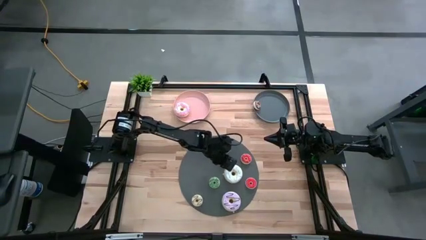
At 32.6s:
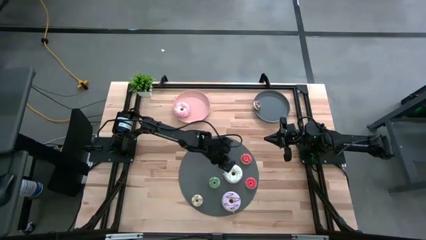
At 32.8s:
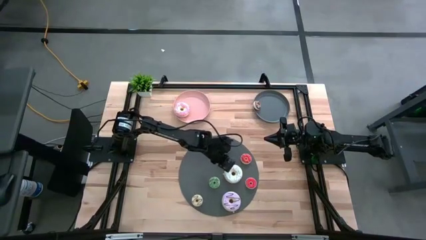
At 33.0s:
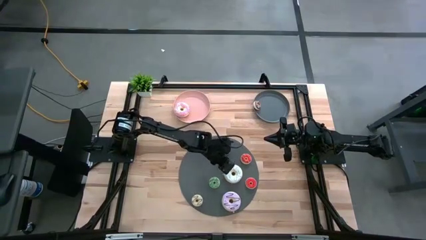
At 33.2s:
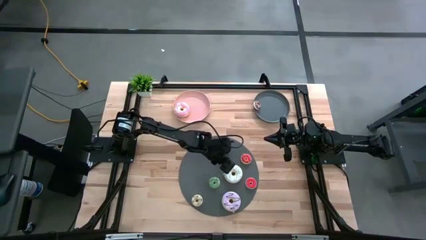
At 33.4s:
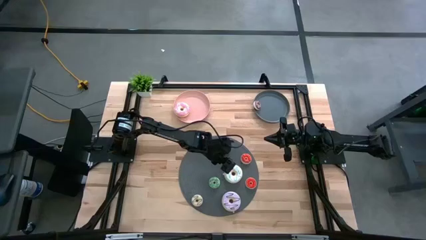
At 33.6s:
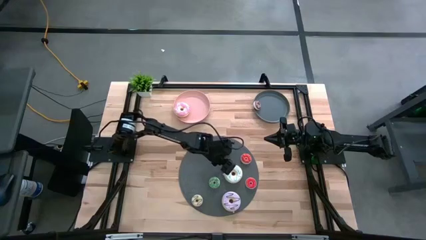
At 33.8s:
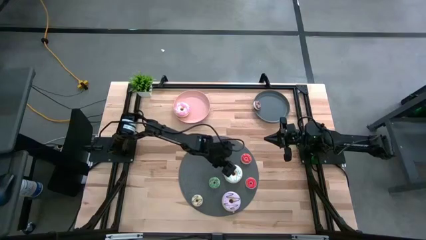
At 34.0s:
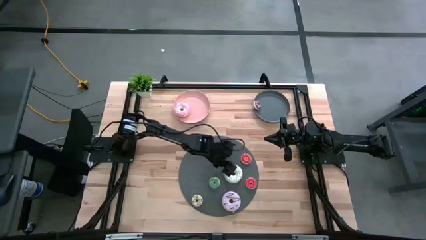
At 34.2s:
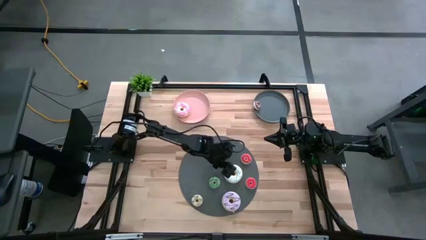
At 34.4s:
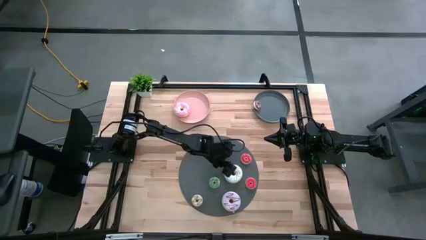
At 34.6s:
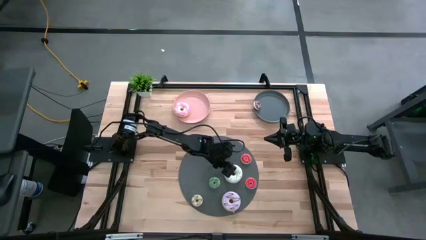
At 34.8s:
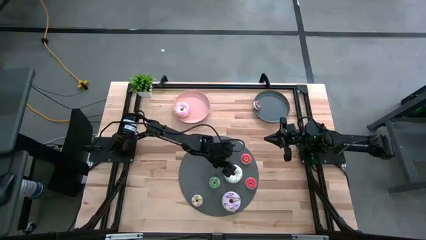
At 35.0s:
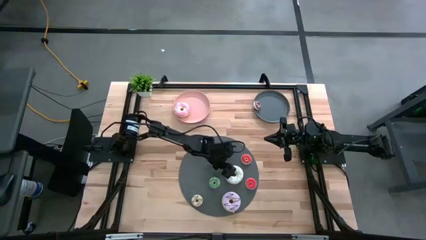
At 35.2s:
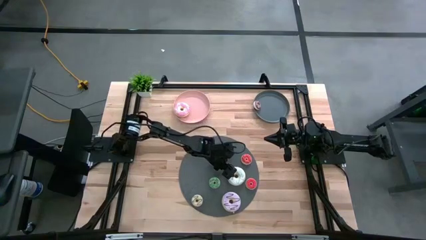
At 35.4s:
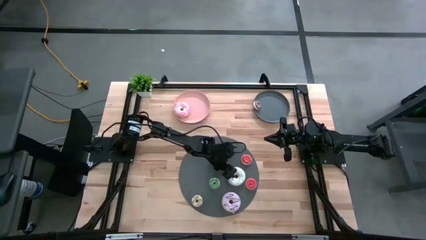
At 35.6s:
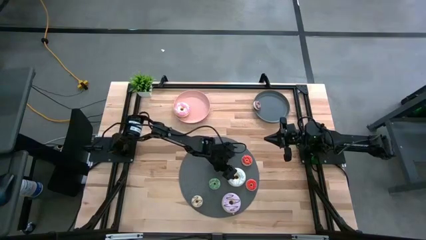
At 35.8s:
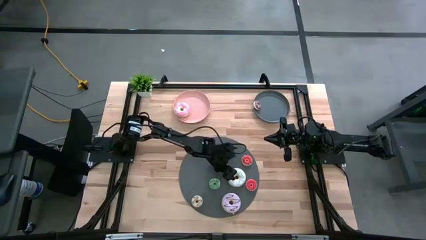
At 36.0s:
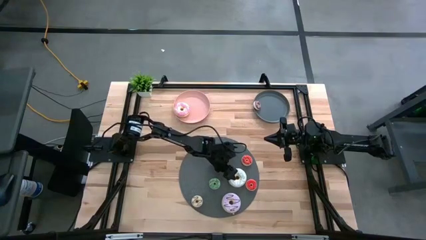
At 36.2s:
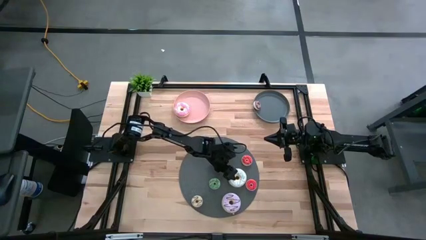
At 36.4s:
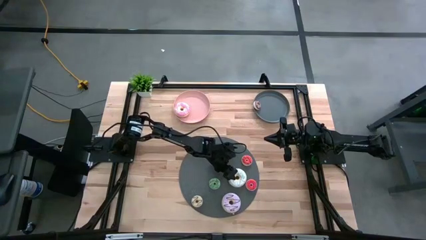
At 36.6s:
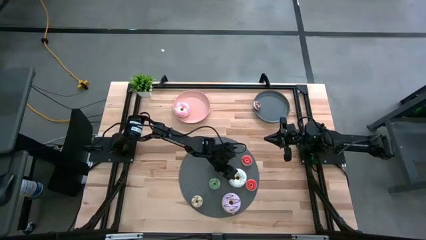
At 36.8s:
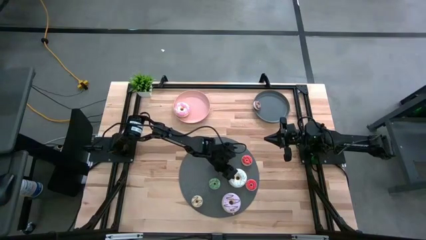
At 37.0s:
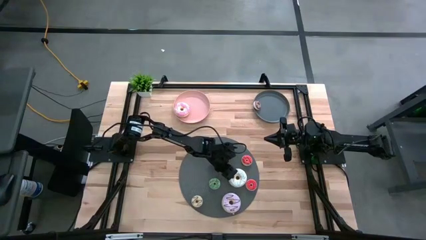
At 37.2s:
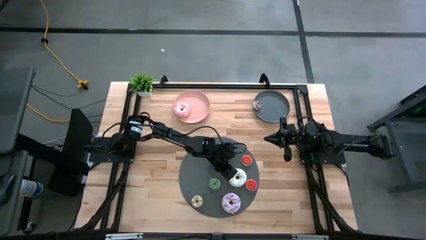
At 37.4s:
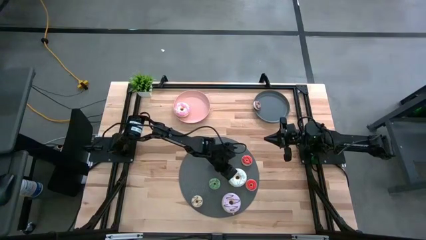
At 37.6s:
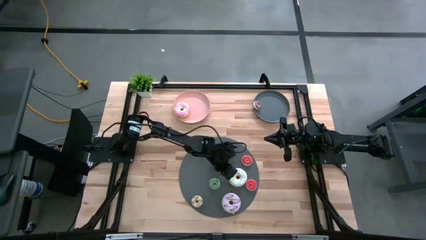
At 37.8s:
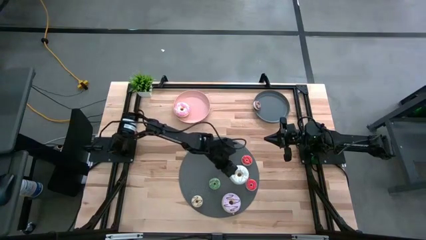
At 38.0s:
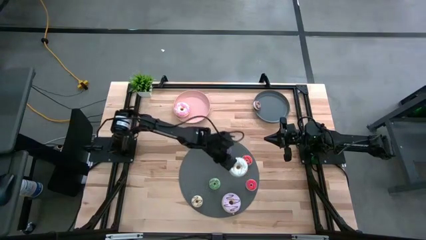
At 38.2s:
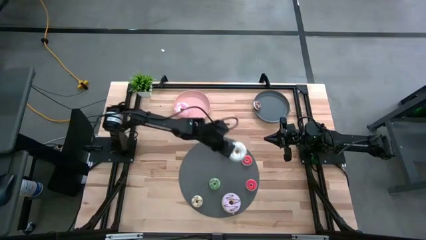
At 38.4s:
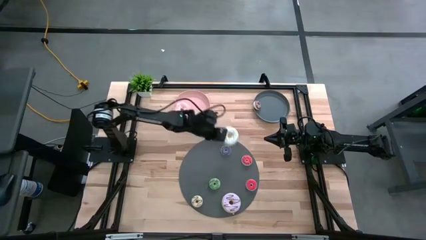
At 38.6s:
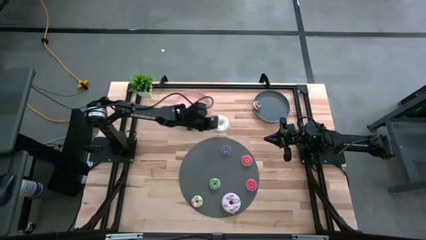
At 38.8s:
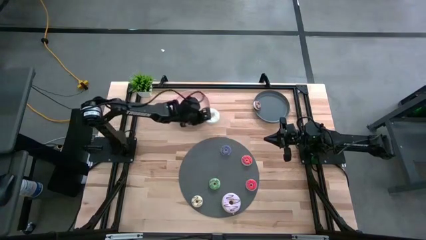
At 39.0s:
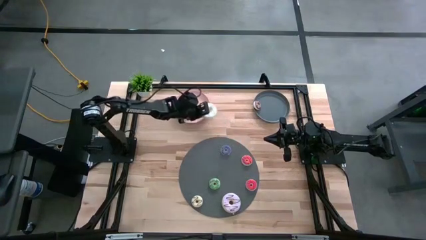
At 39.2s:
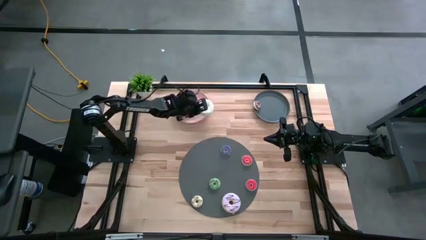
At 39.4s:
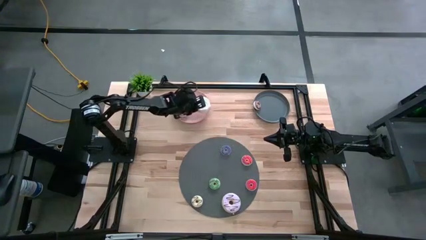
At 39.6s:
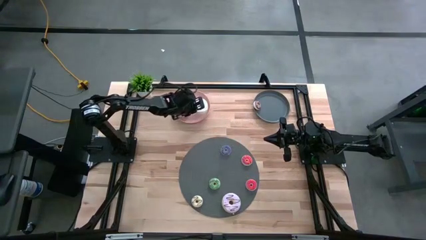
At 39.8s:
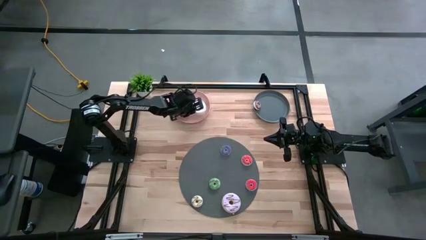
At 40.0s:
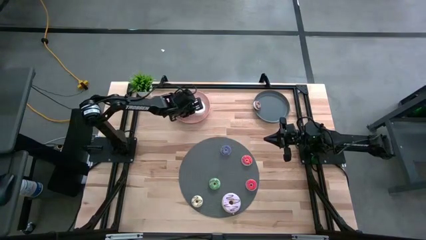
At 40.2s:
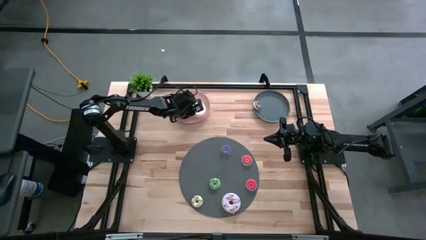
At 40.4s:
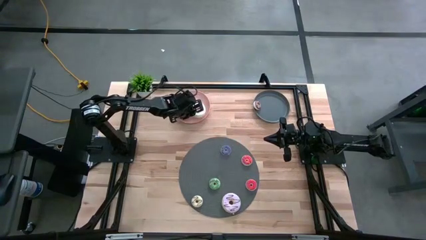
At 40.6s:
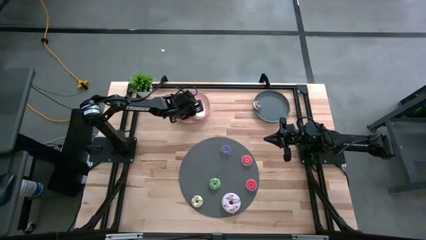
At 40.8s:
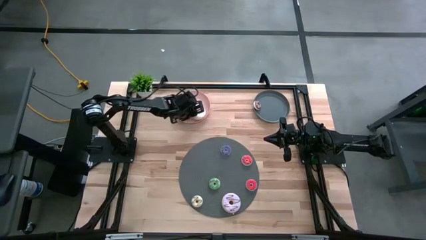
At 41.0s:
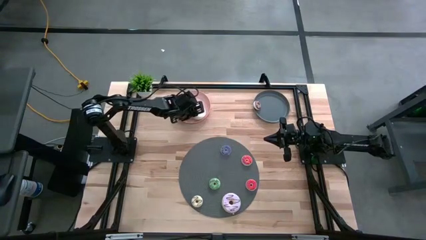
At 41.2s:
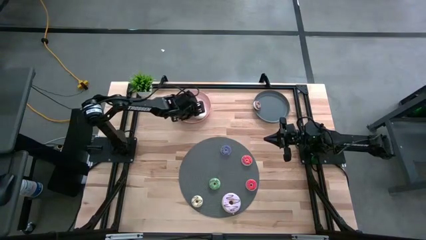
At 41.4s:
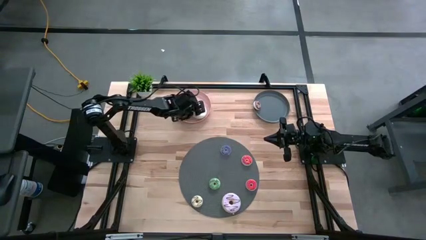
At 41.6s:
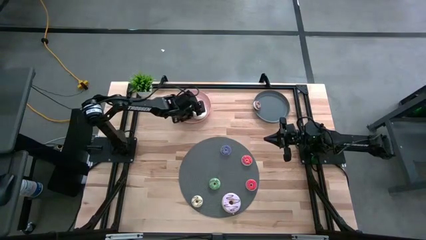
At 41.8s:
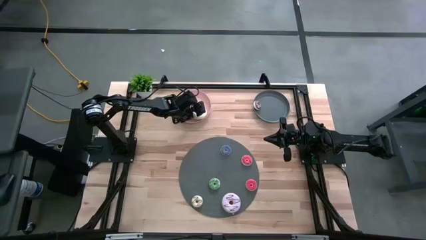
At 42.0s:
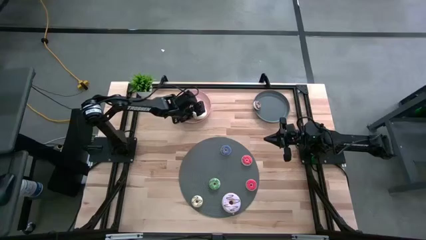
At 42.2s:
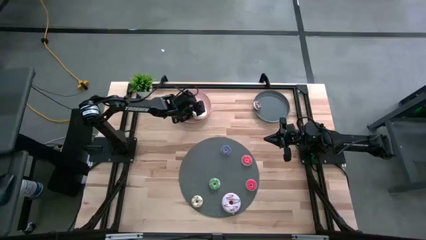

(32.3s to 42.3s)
Task: Pick & Place donuts
Put the large white donut on the pink plate

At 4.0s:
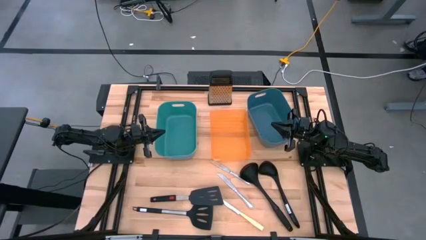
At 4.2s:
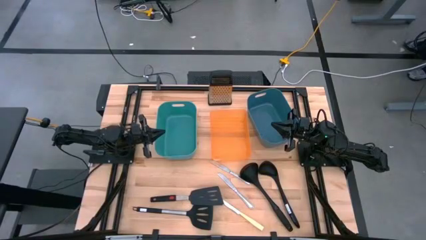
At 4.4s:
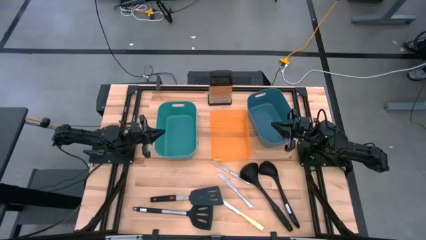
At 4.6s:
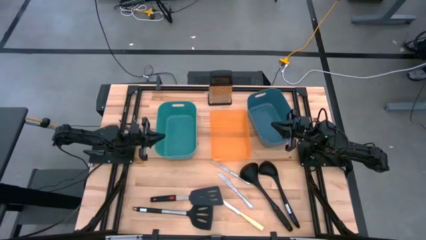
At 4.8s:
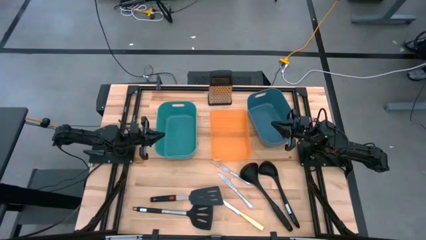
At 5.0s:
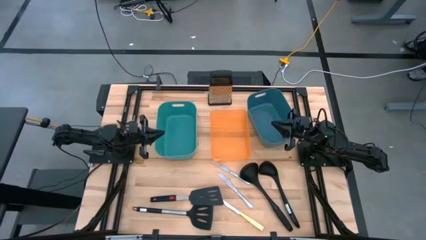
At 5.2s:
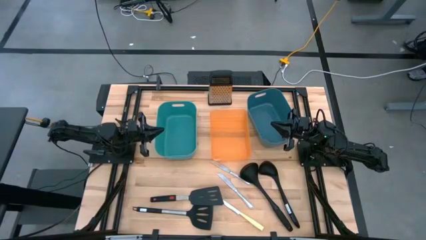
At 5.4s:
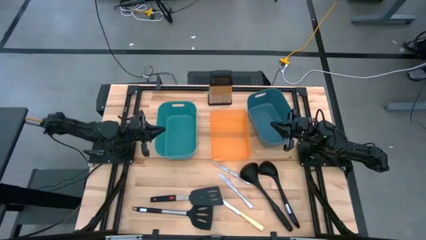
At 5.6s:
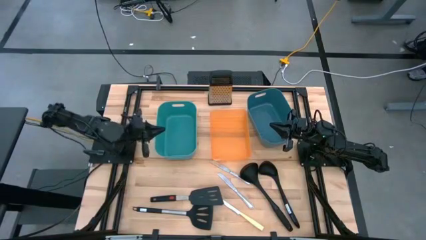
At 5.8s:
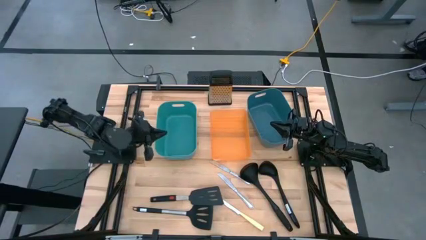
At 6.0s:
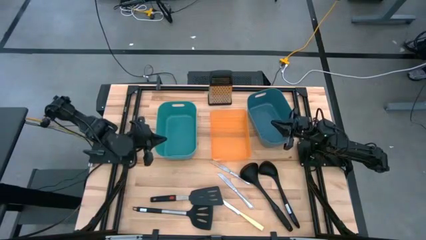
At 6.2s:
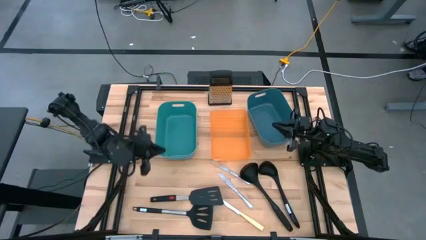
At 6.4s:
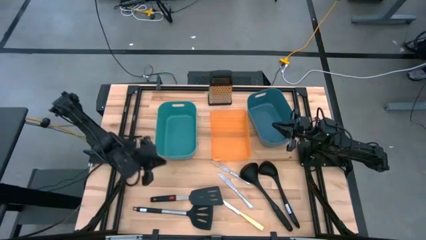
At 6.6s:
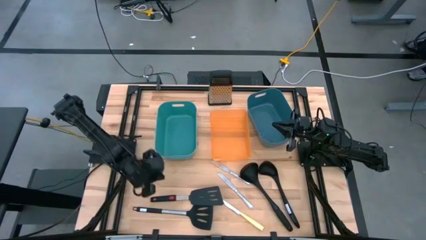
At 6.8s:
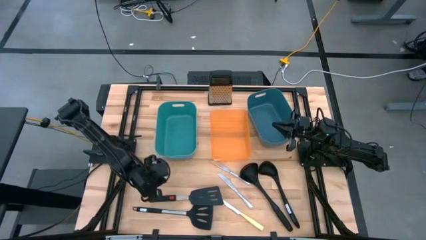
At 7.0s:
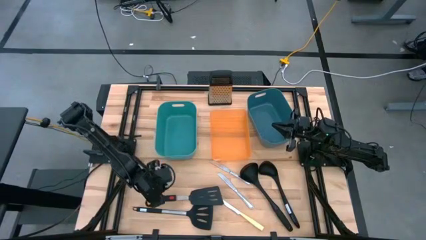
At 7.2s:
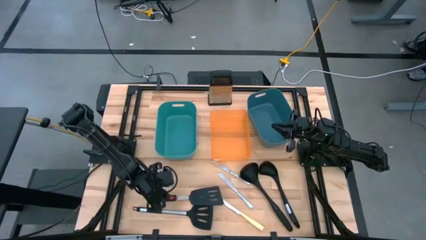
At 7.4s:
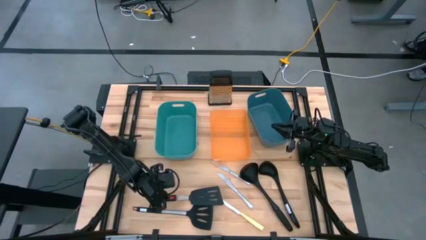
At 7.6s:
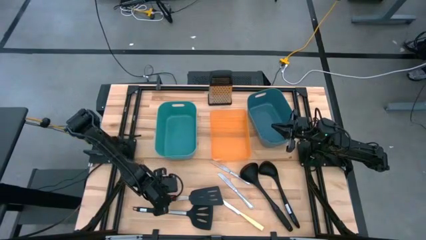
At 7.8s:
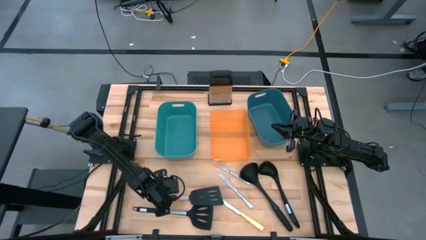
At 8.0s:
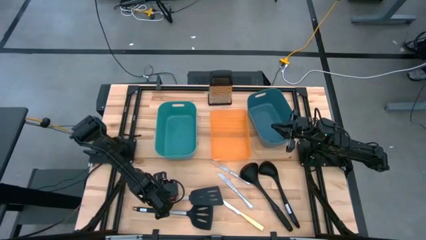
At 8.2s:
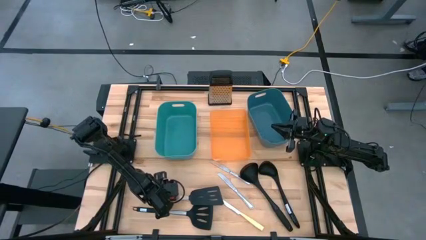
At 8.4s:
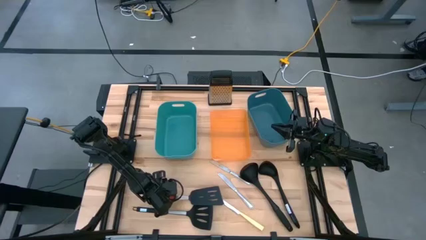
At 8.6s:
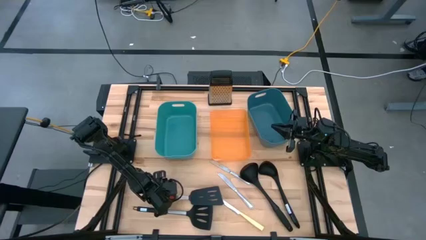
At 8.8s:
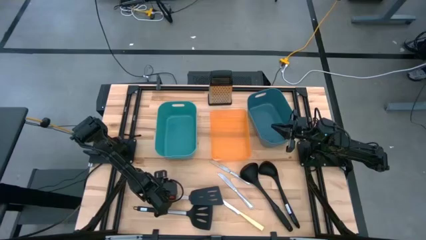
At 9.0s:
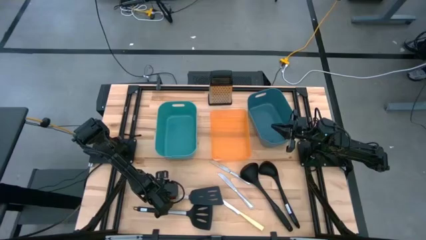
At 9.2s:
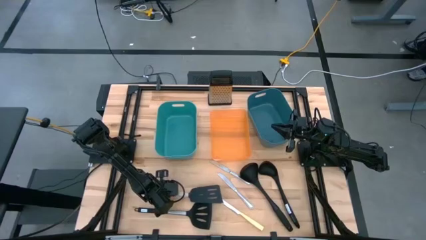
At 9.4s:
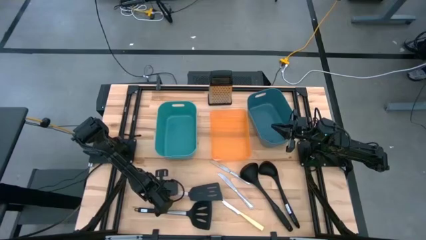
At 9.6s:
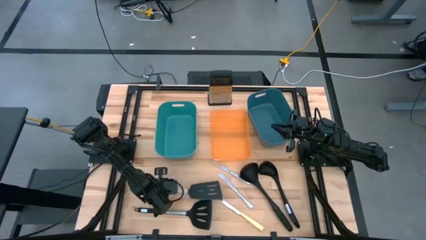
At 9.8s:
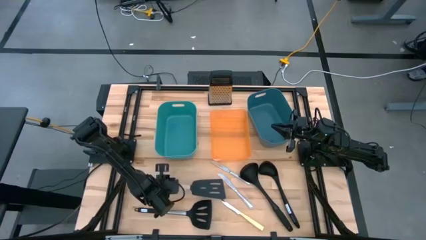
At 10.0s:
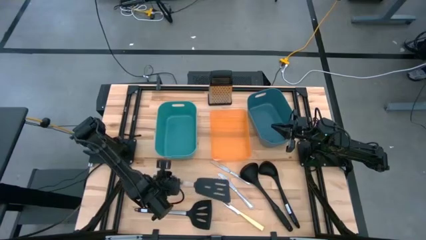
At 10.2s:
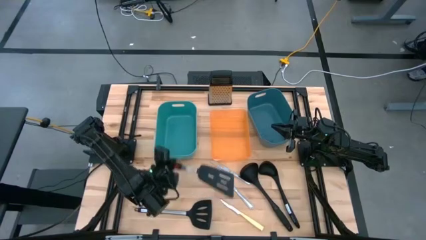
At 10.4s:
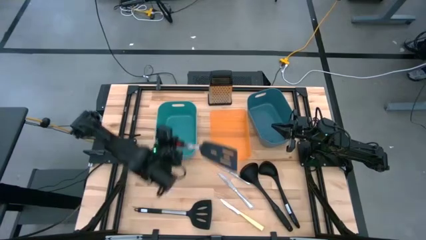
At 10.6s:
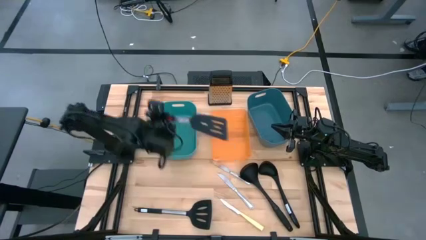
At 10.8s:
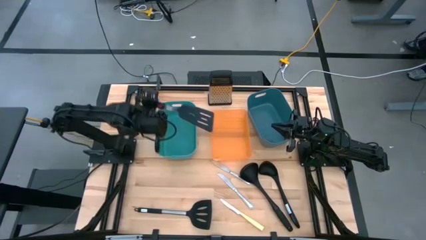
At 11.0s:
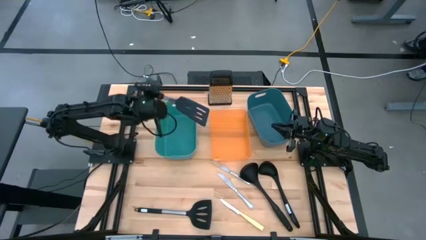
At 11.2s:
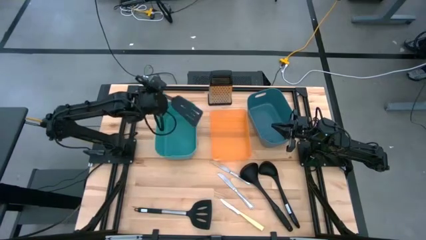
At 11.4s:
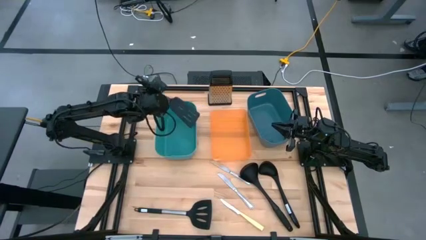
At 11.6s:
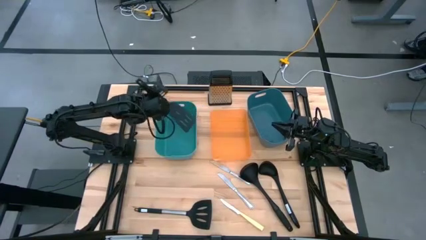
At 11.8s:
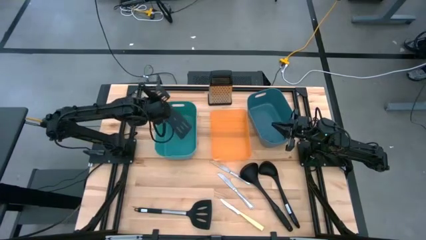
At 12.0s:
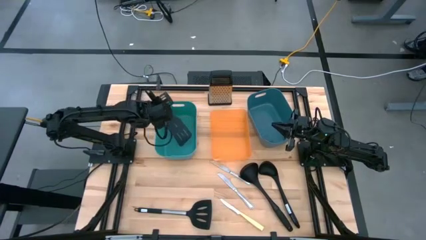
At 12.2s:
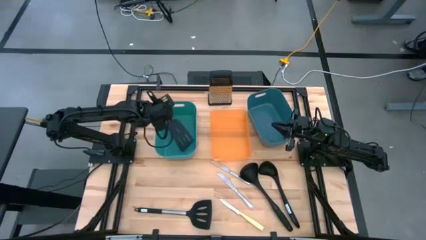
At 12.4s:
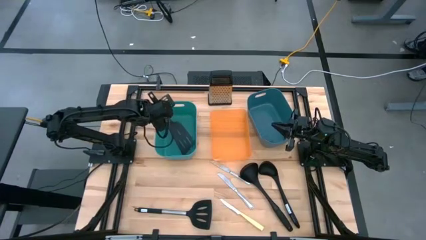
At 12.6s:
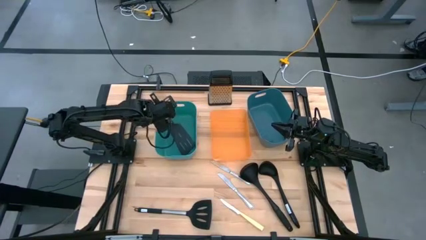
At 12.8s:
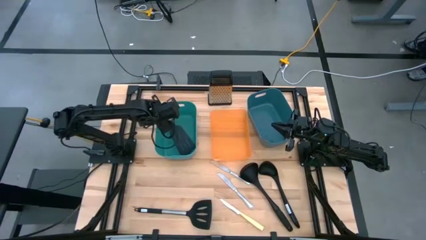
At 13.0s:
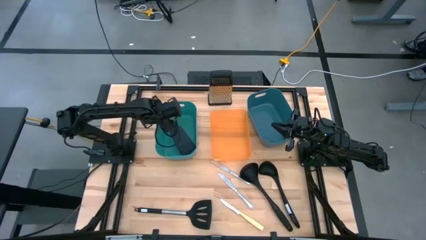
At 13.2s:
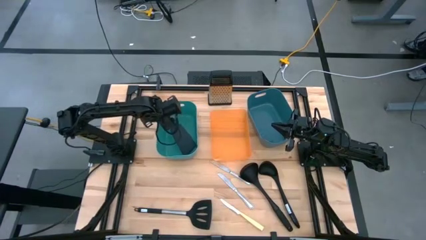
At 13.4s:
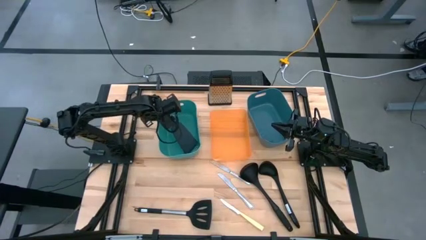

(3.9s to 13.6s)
Task: Pick & Place Kitchen Items
Put the top black spatula into the green bin
